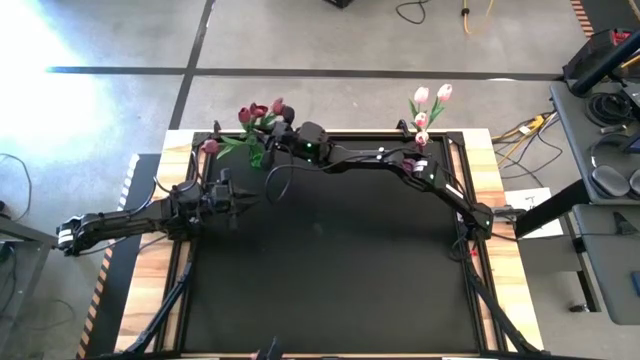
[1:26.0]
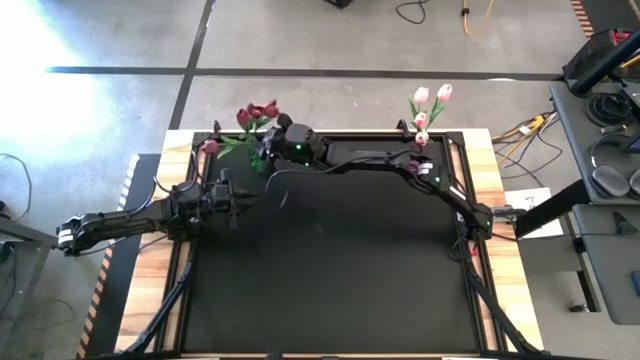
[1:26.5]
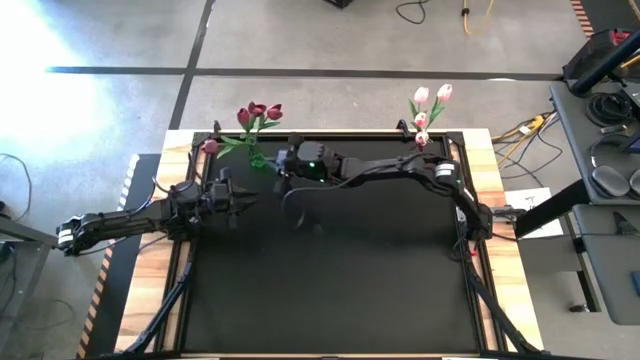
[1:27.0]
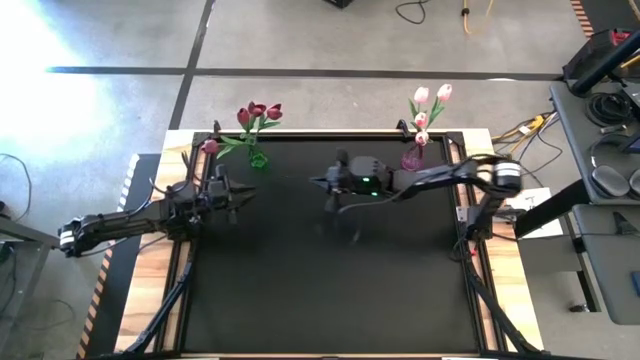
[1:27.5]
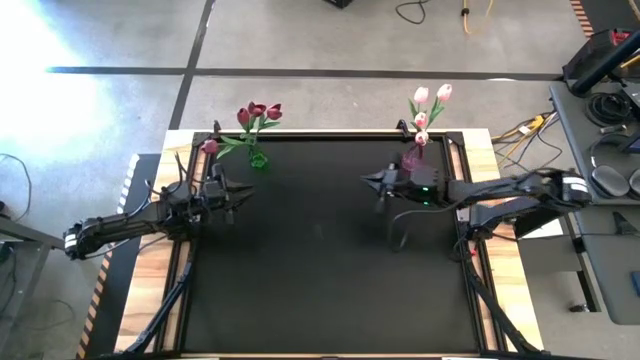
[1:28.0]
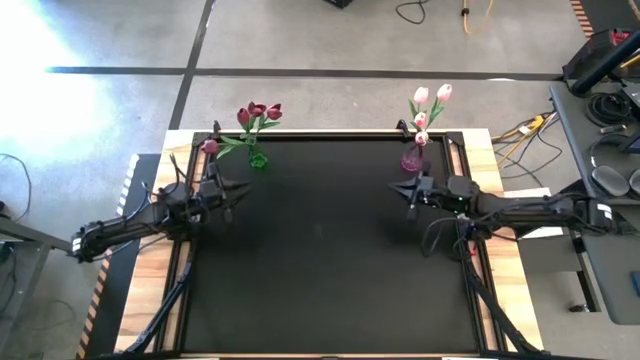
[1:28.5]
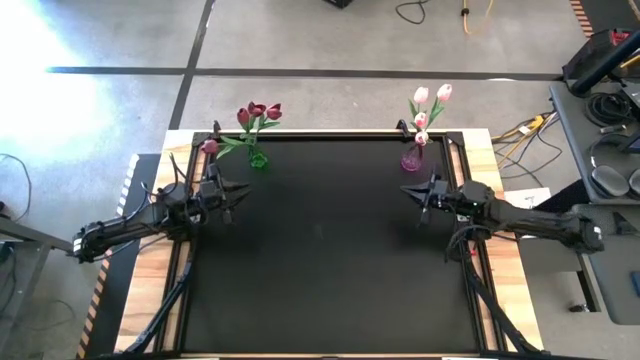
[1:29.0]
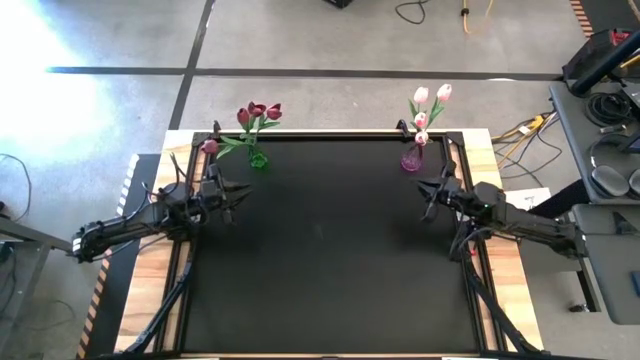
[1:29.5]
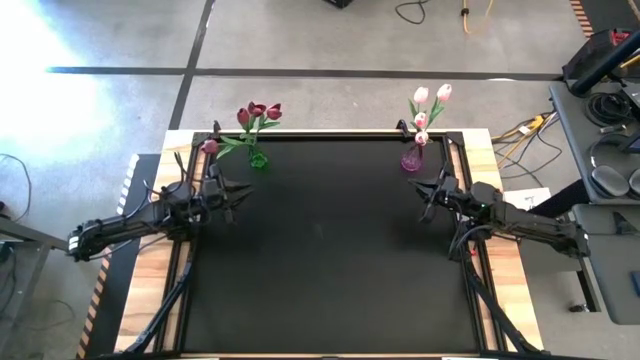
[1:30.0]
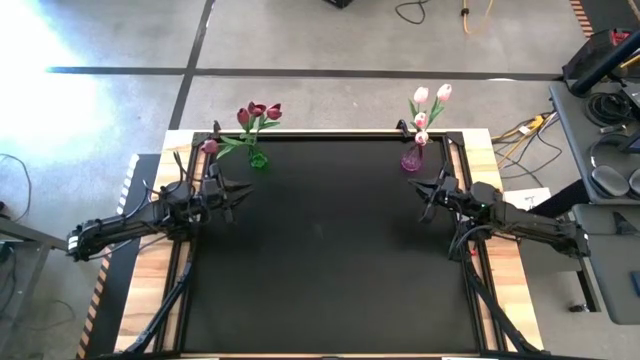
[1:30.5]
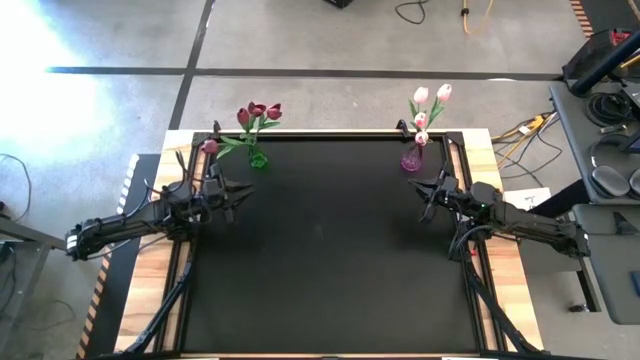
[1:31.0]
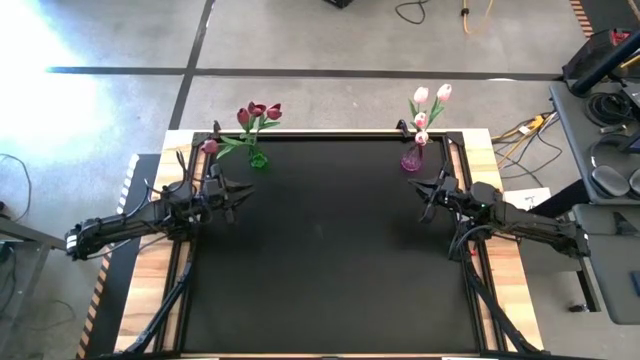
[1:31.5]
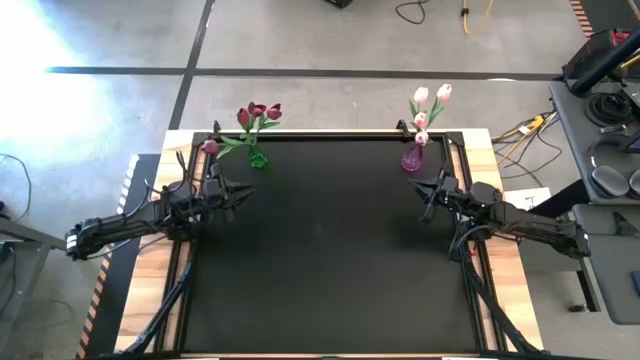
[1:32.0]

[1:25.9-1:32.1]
Task: Sort flowers into vase by color
Return to Home Position

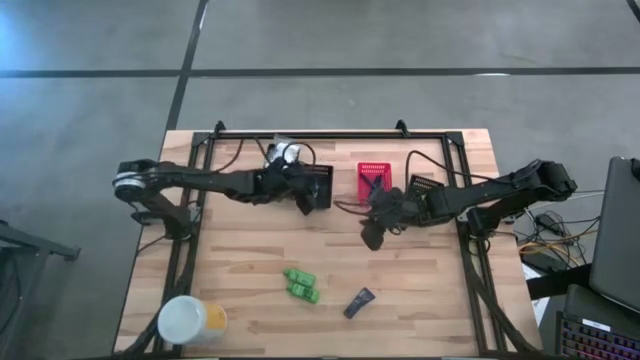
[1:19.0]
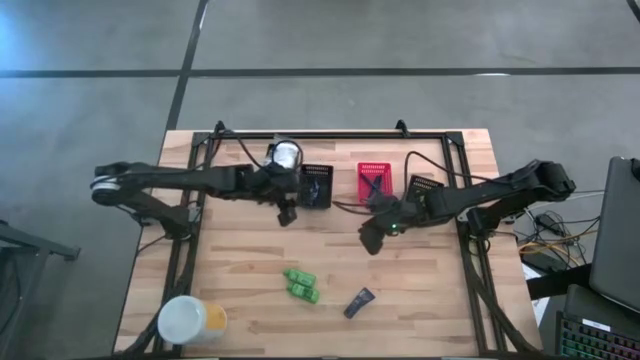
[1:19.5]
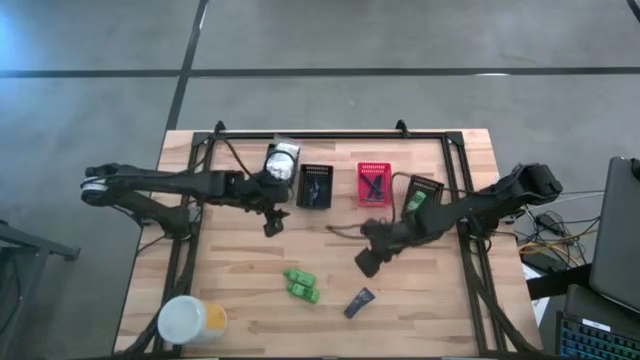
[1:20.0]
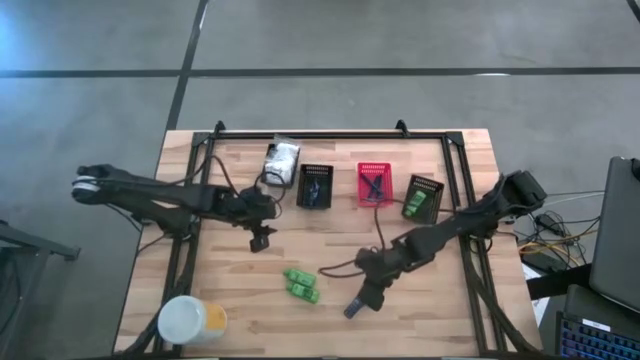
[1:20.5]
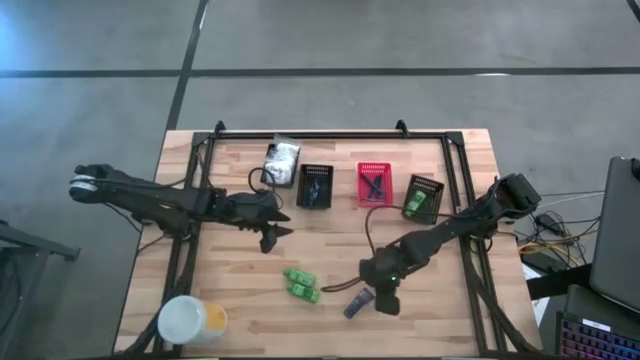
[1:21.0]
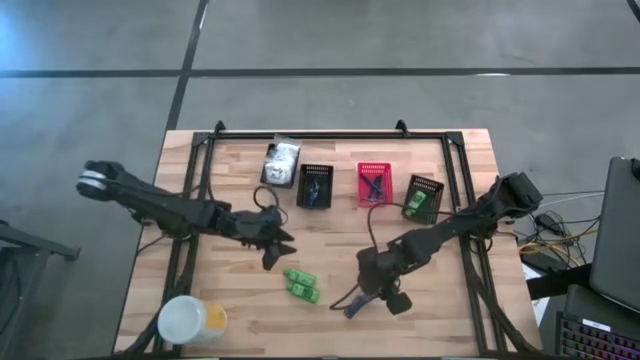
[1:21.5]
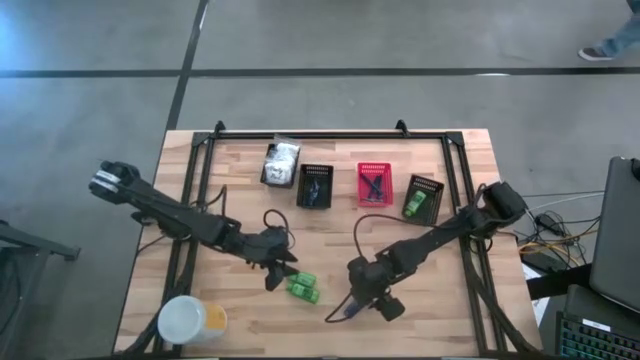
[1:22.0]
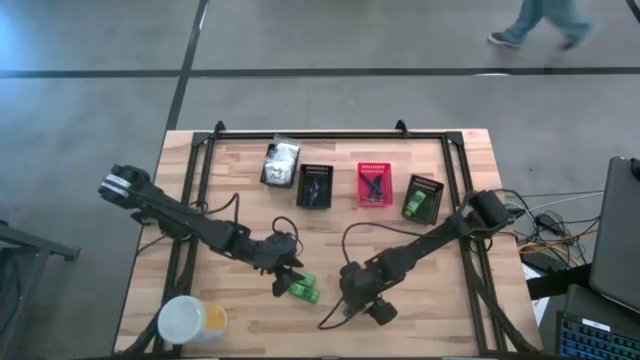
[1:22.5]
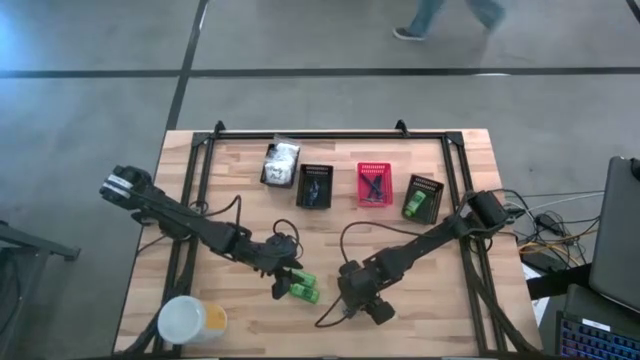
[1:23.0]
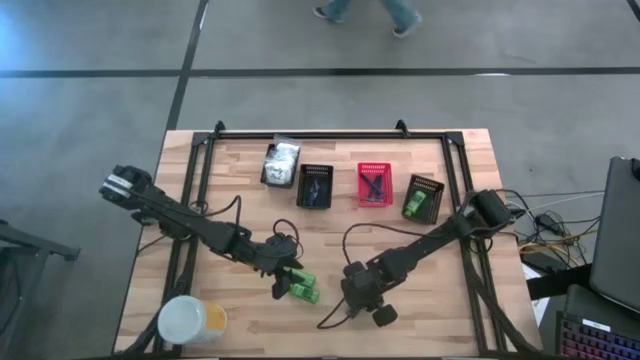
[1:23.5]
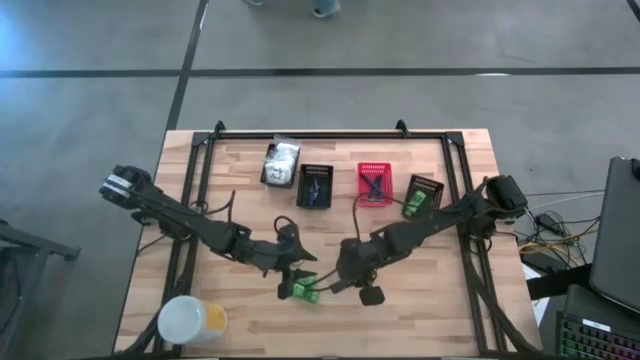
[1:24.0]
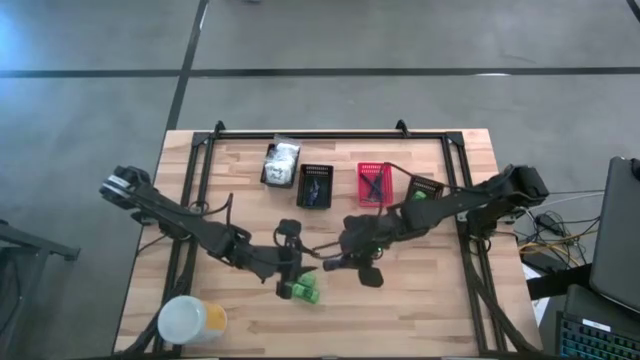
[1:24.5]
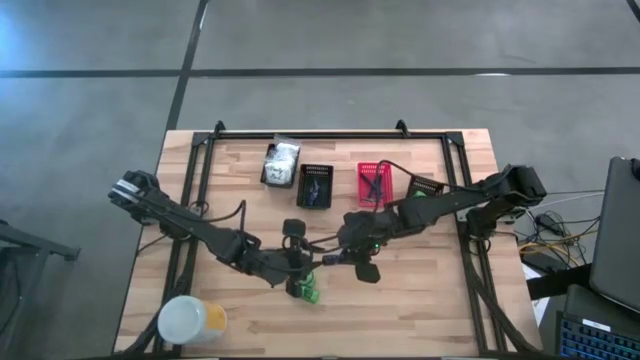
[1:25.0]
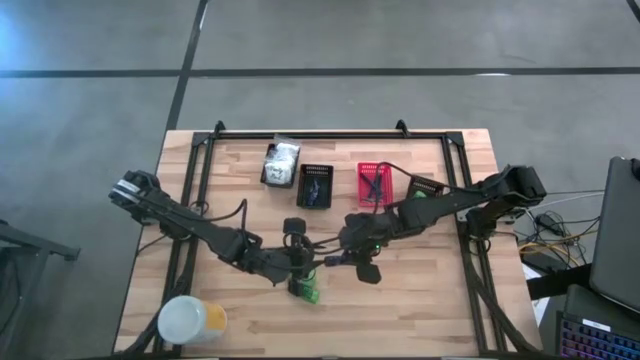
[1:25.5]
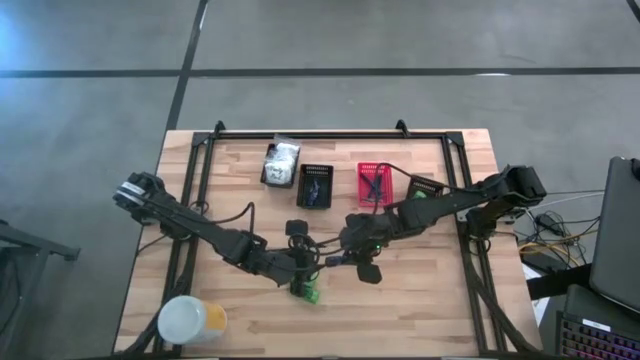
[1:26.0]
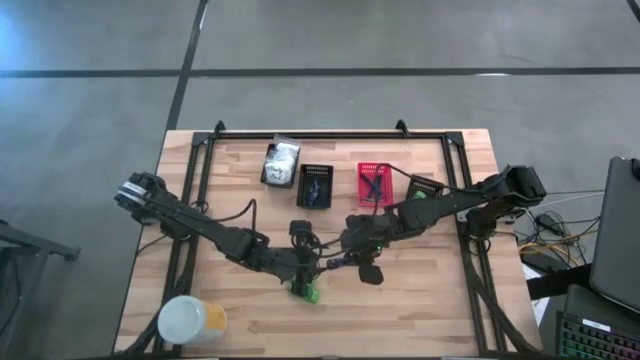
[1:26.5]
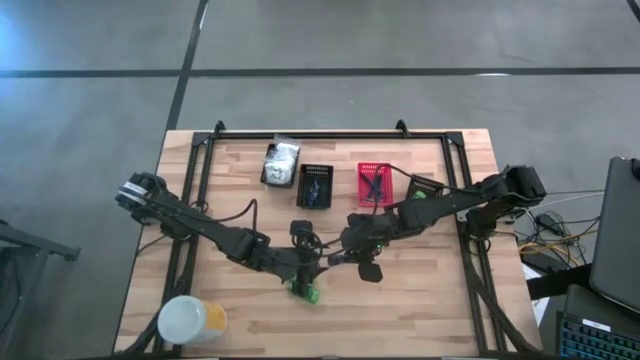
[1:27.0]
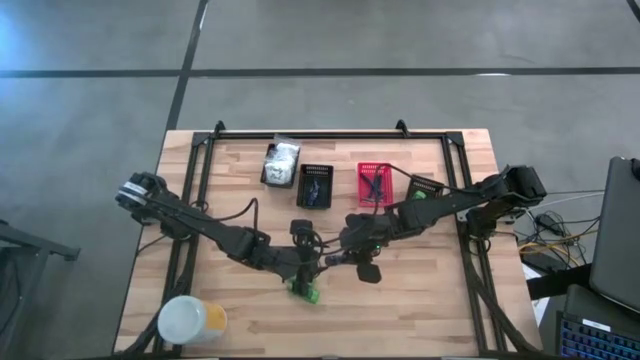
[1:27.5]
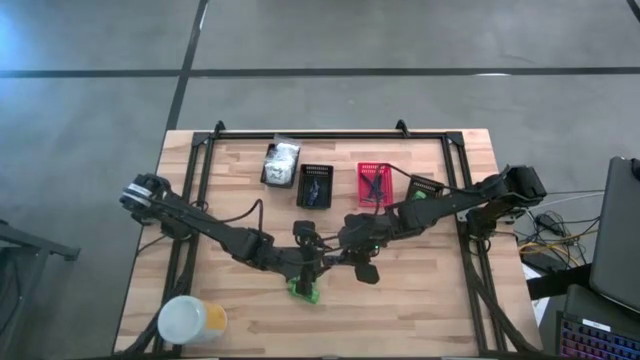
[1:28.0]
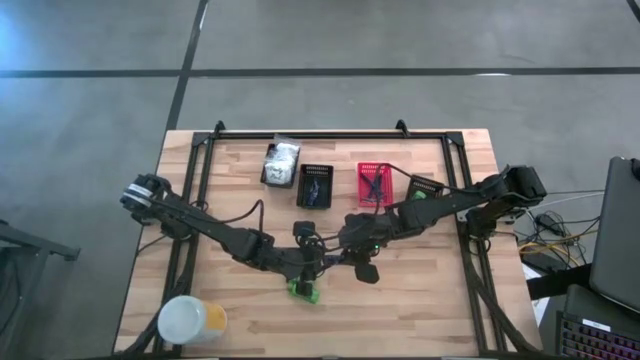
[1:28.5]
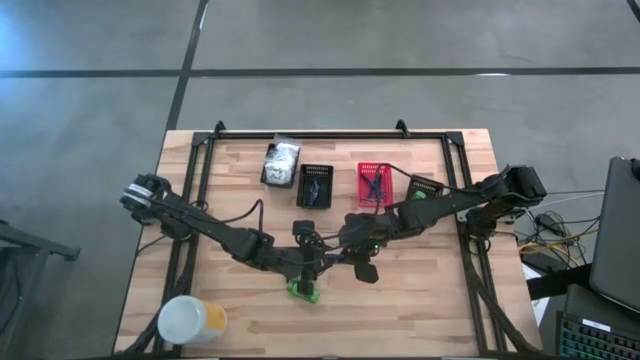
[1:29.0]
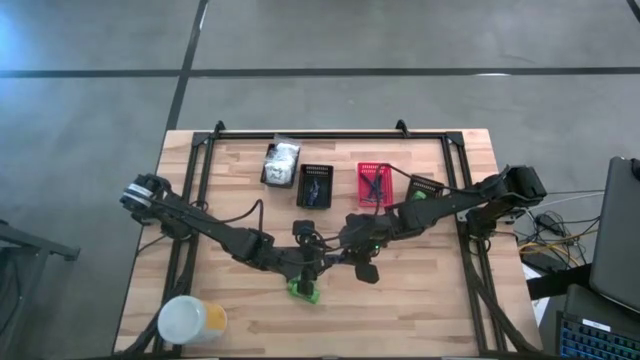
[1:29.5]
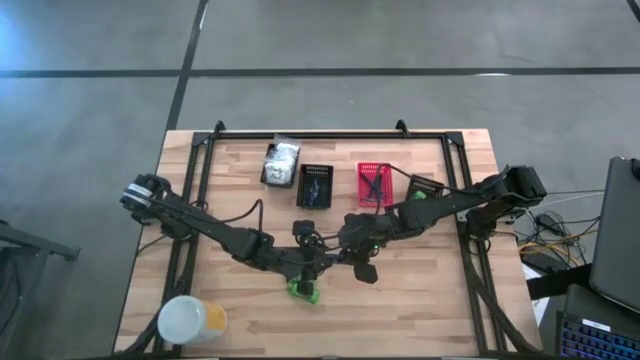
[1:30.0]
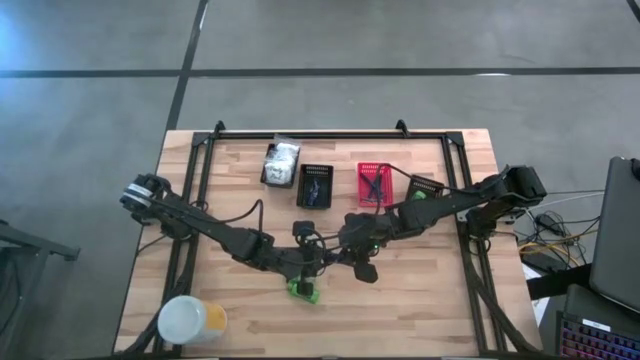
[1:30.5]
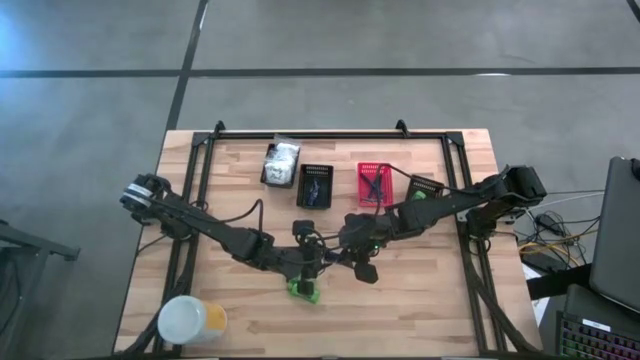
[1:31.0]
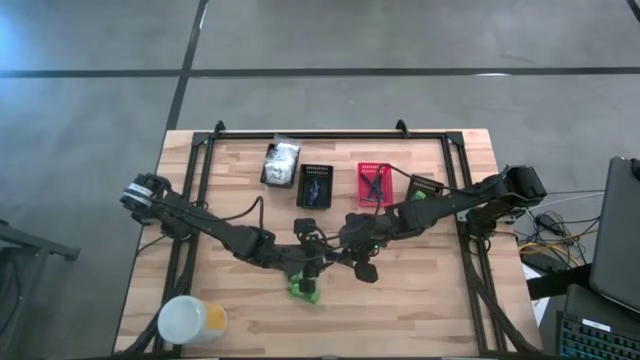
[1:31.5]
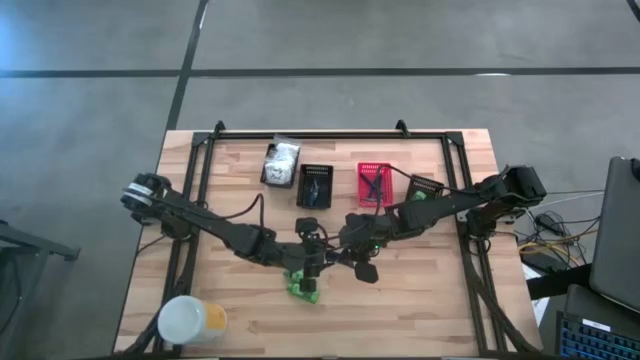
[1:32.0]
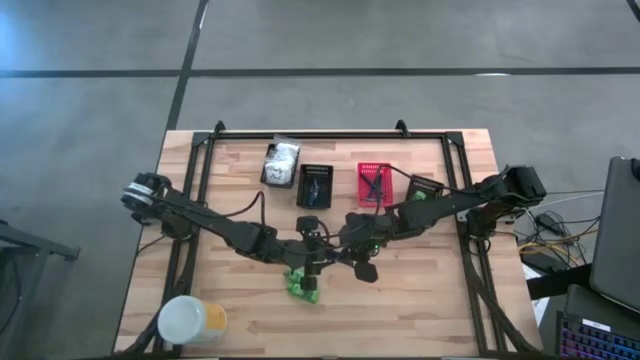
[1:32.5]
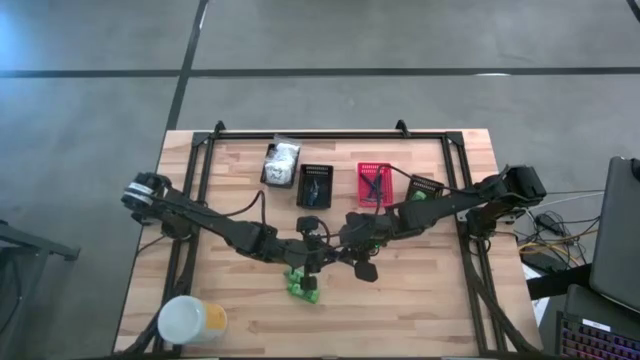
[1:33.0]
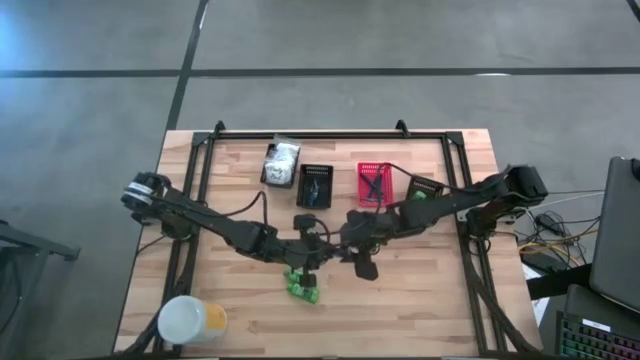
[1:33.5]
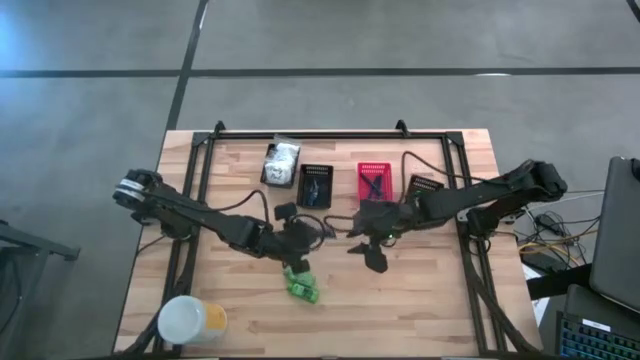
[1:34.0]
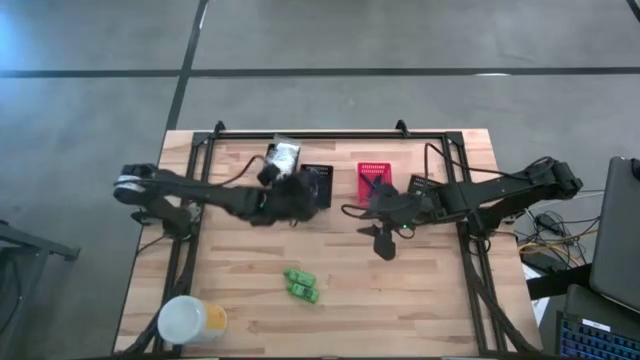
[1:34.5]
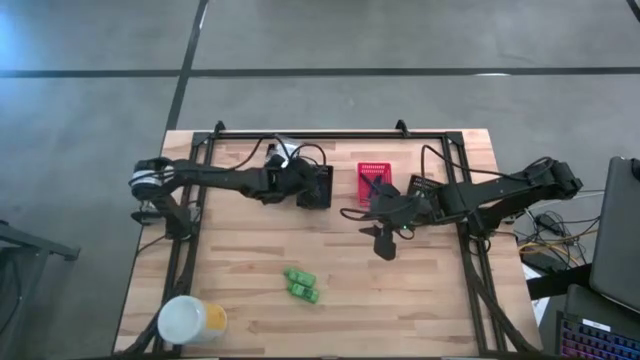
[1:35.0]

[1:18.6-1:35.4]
Task: Pick & Place Travel size toiletries
Put the blue shave cream into the middle black bin
